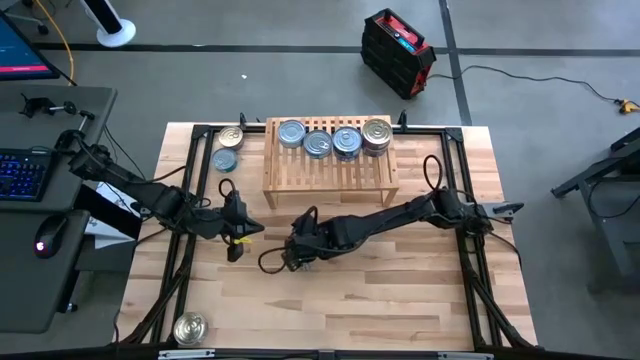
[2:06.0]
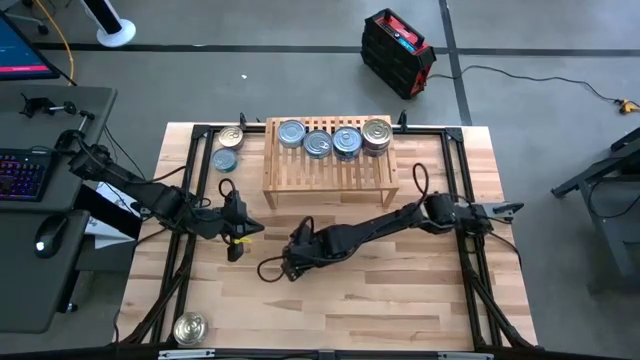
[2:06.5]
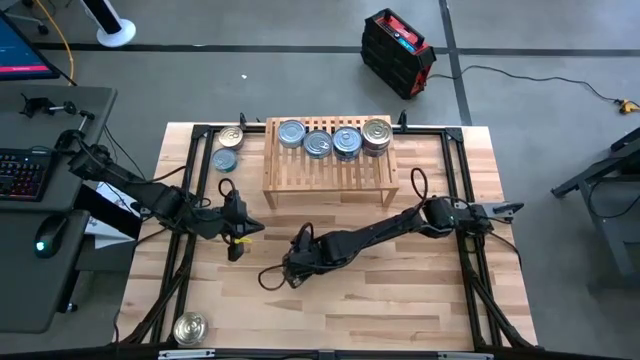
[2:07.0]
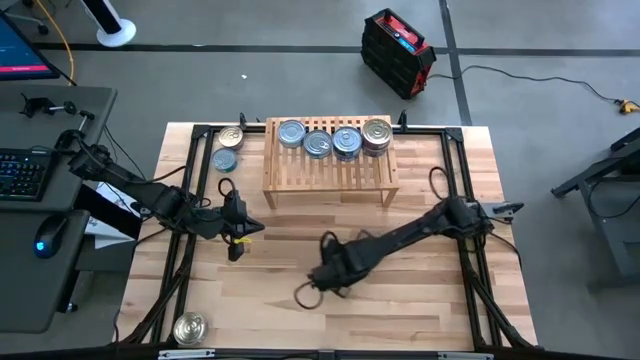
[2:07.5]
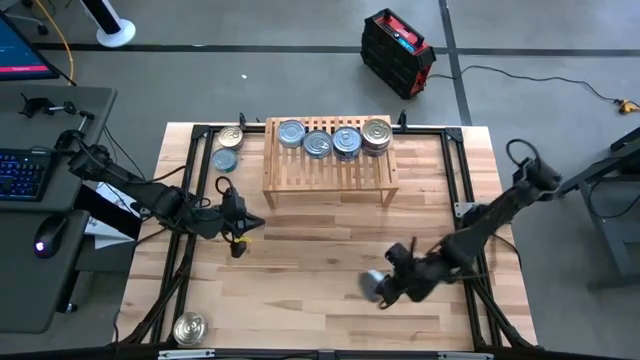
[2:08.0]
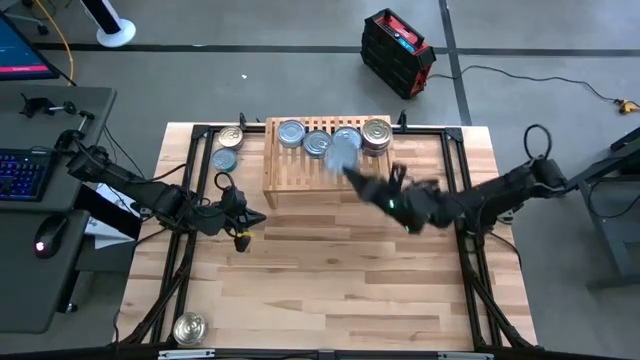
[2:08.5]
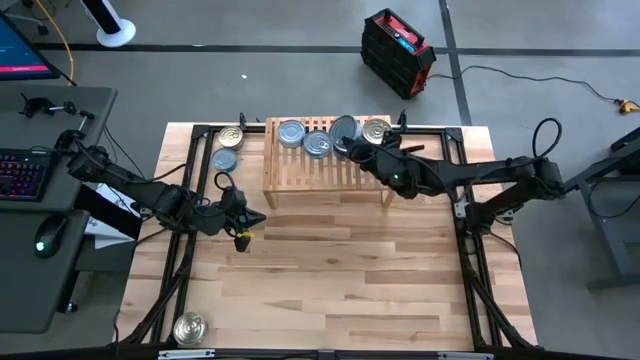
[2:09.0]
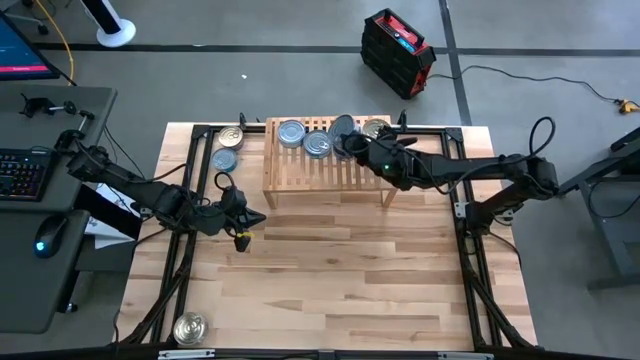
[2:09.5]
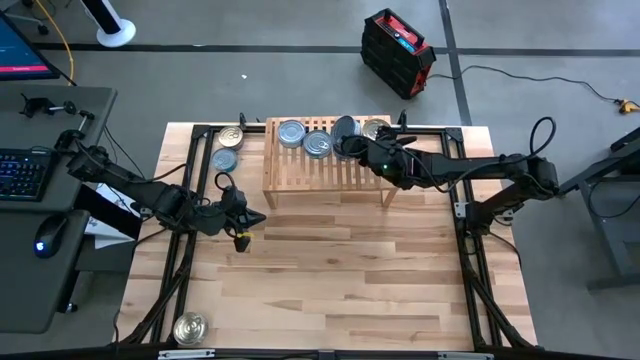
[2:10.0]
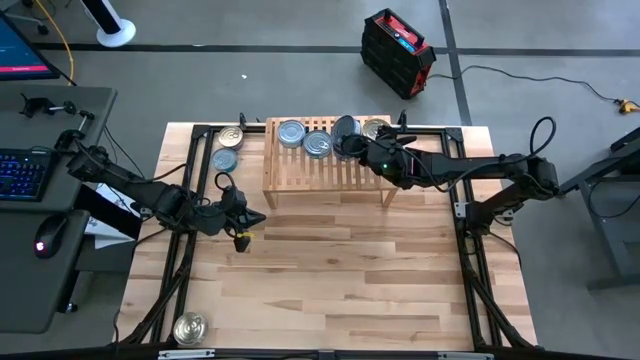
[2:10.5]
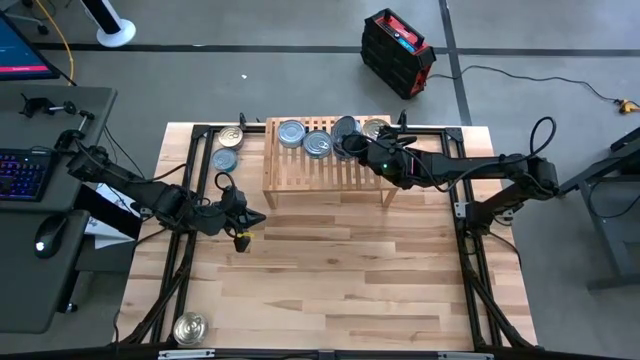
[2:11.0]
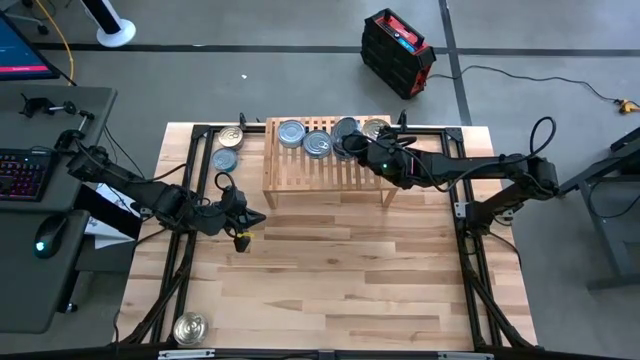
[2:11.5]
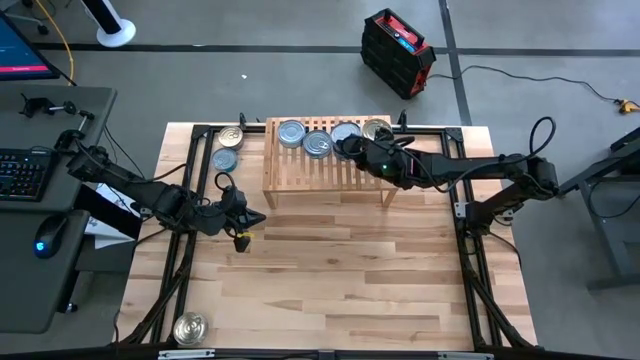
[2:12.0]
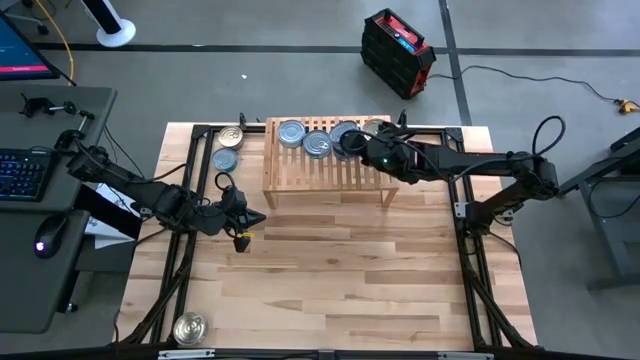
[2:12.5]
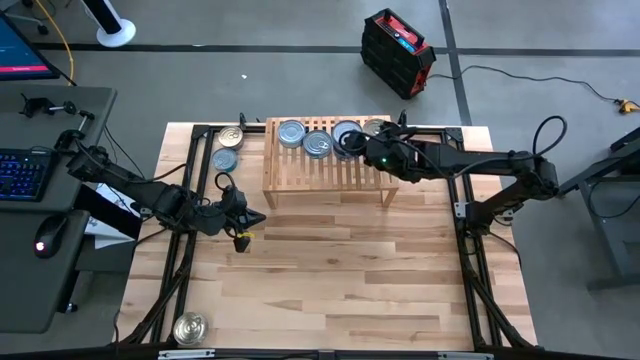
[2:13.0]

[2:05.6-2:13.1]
Task: Stack canned seafood by type on shelf
Stack the blue tuna can on the stacked blue tuna cans on the shelf

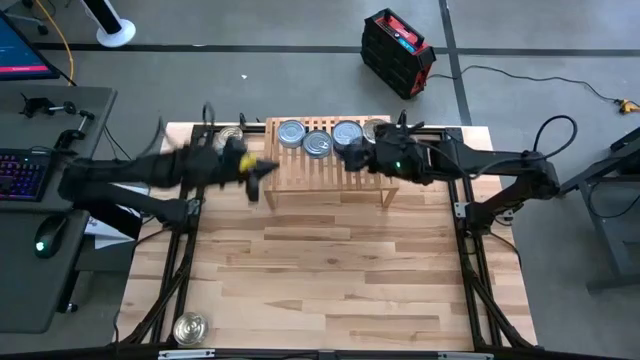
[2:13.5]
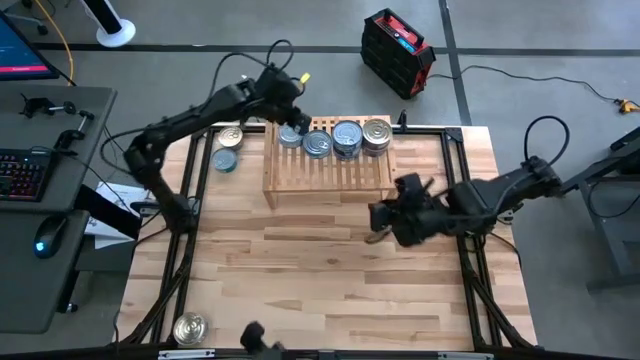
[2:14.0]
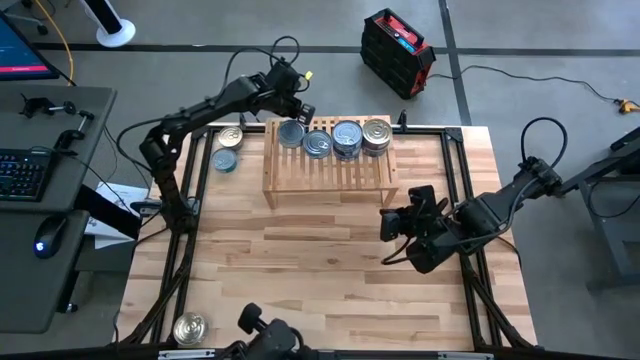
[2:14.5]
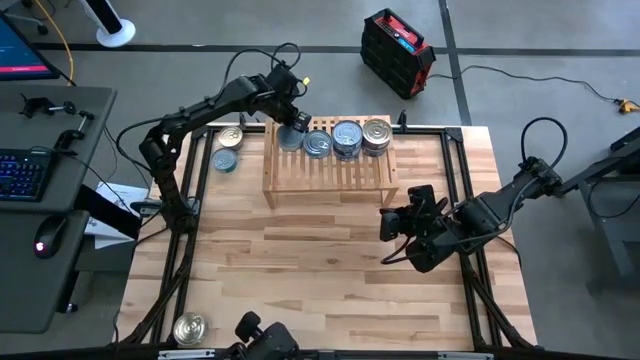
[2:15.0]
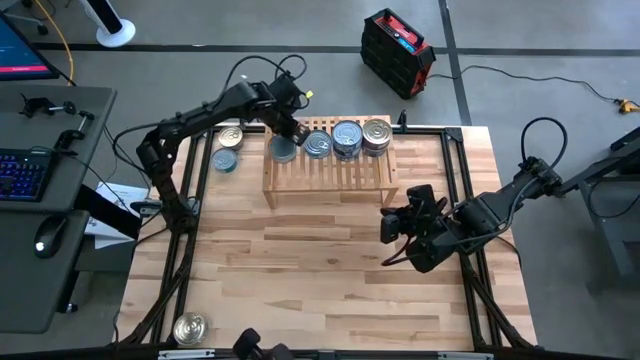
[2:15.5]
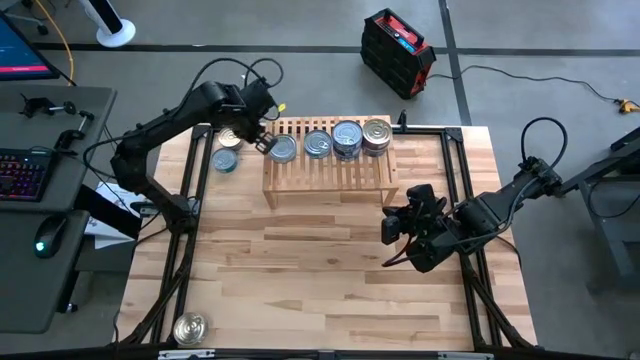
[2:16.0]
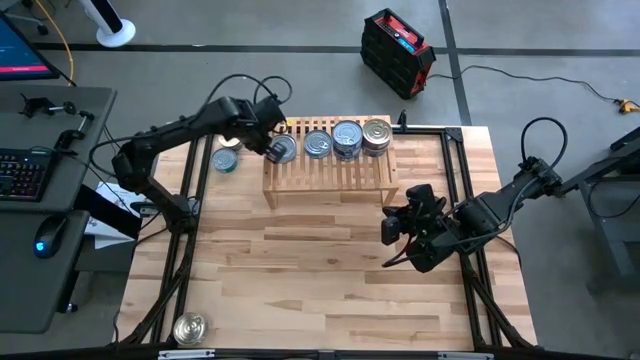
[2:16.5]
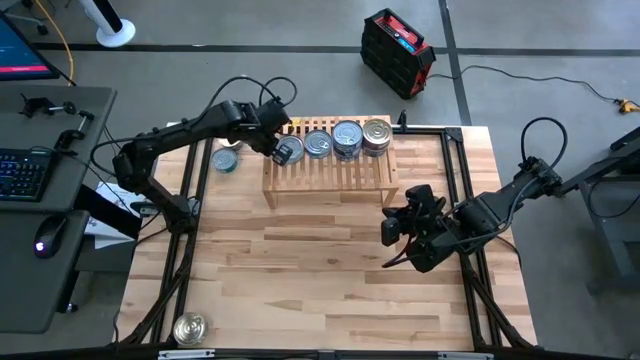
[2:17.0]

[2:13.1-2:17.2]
Adjust the green tuna can on the shelf

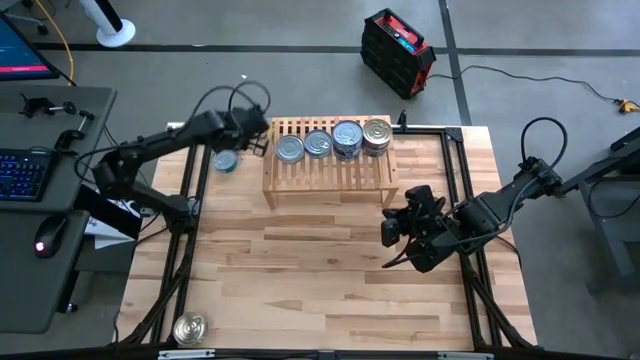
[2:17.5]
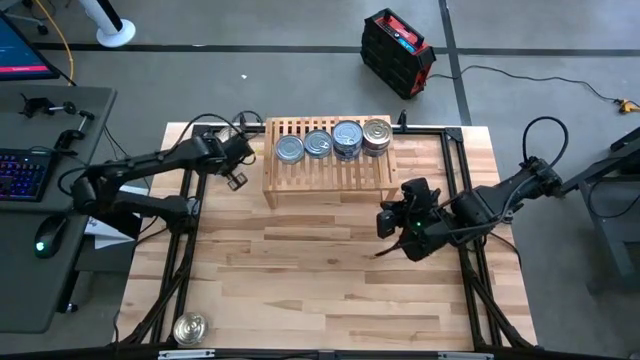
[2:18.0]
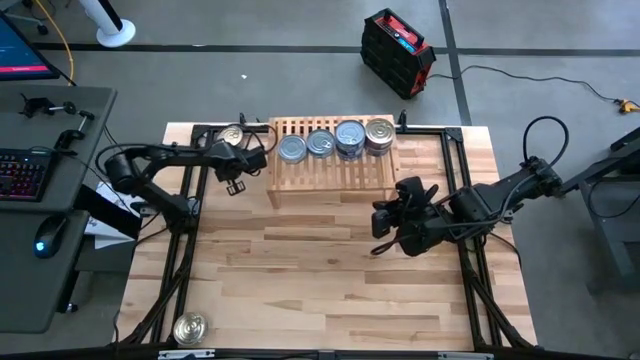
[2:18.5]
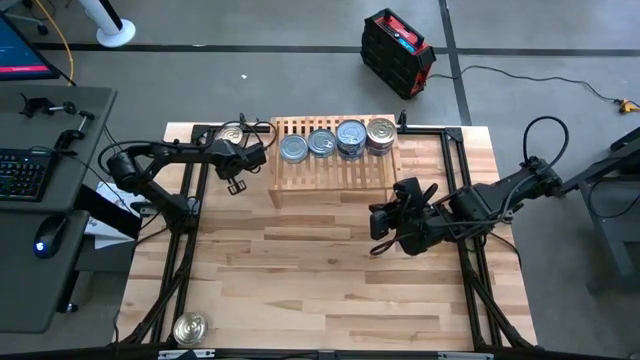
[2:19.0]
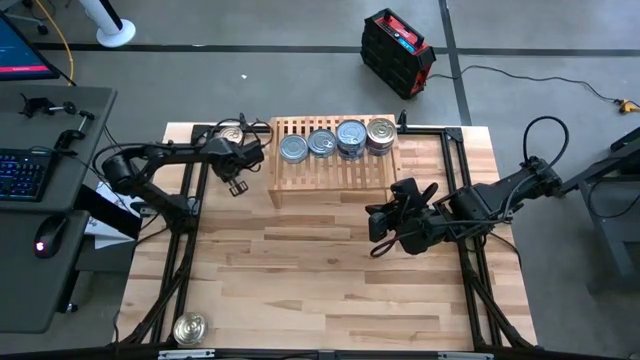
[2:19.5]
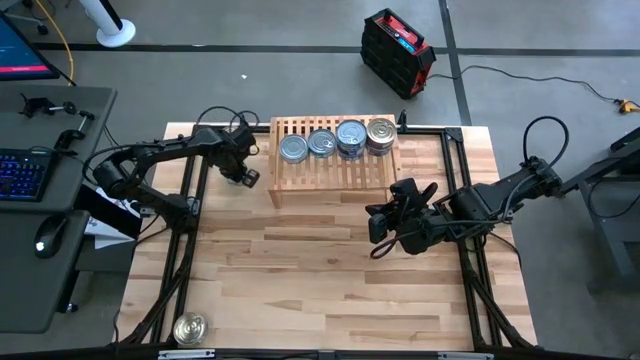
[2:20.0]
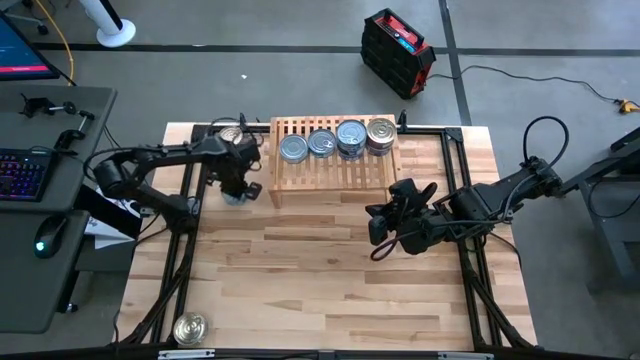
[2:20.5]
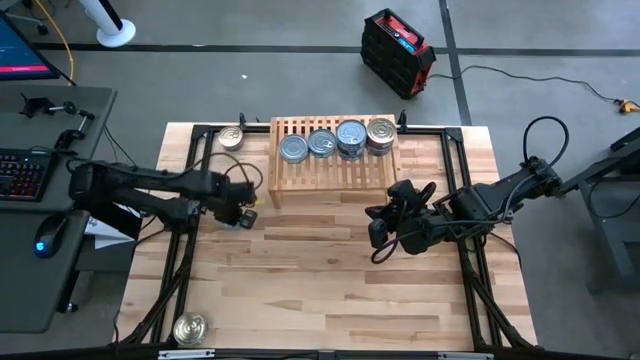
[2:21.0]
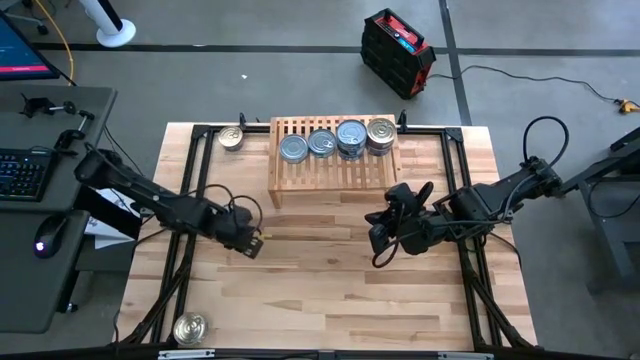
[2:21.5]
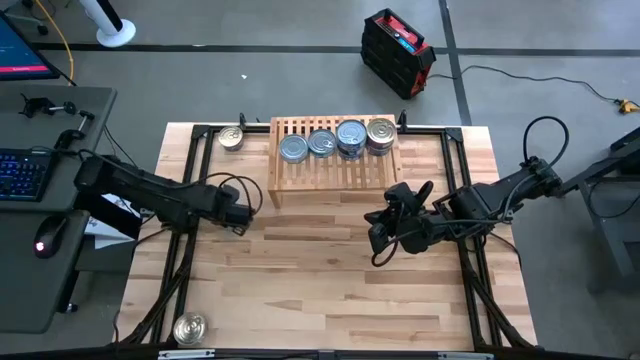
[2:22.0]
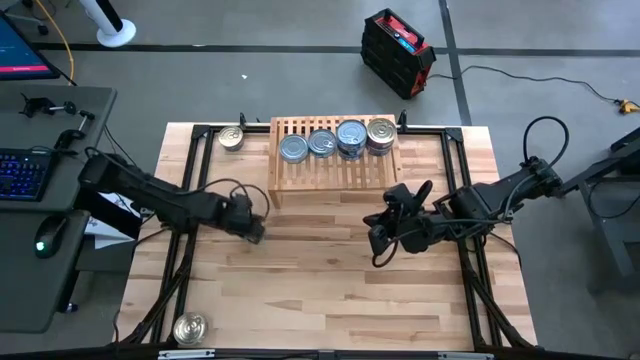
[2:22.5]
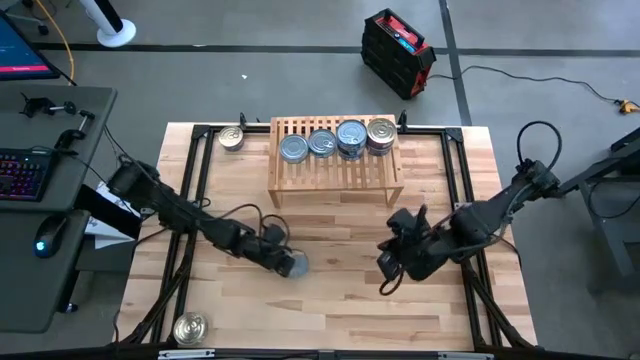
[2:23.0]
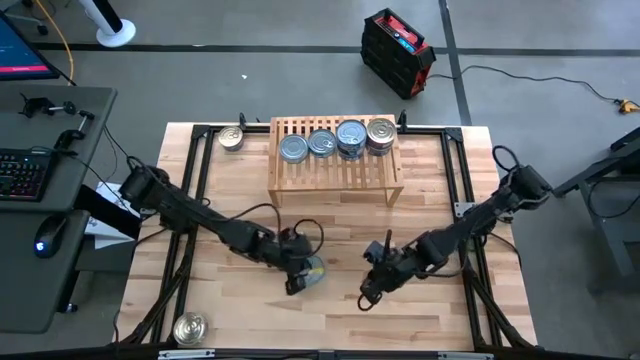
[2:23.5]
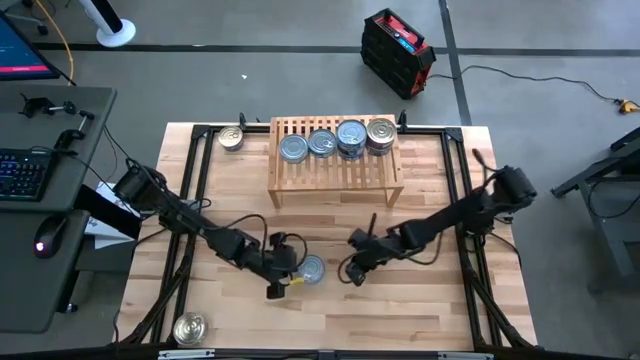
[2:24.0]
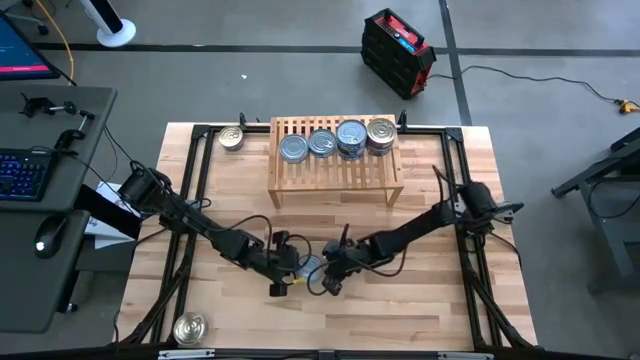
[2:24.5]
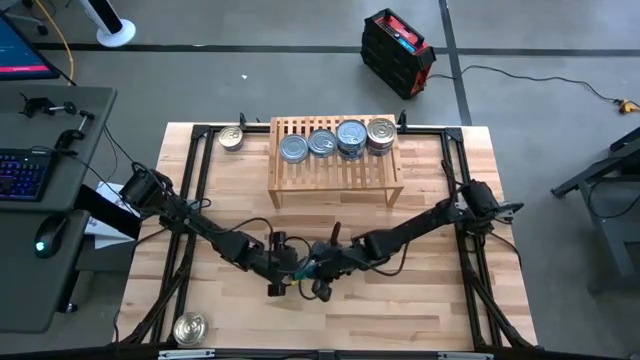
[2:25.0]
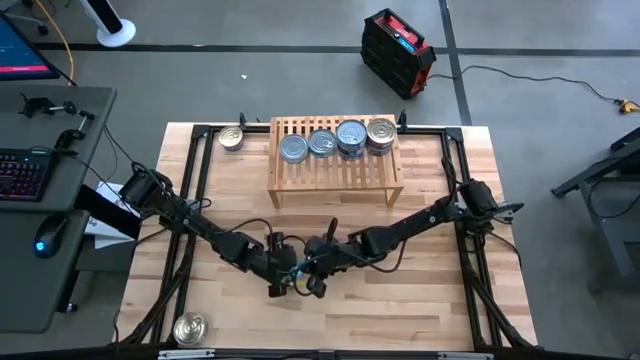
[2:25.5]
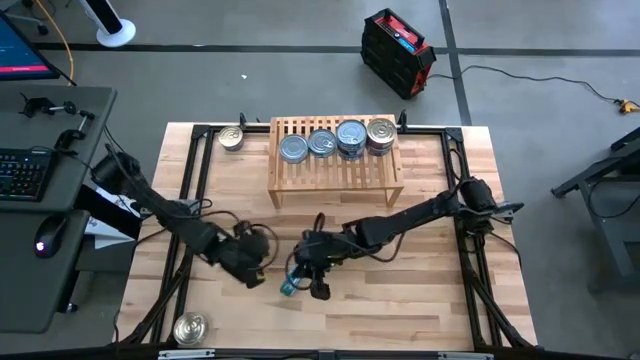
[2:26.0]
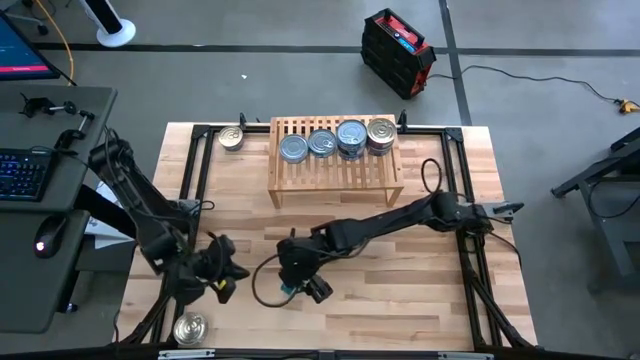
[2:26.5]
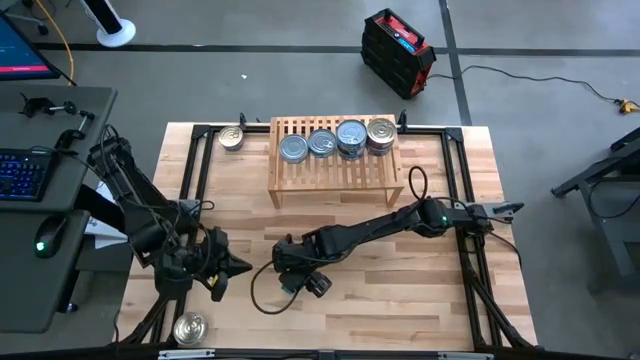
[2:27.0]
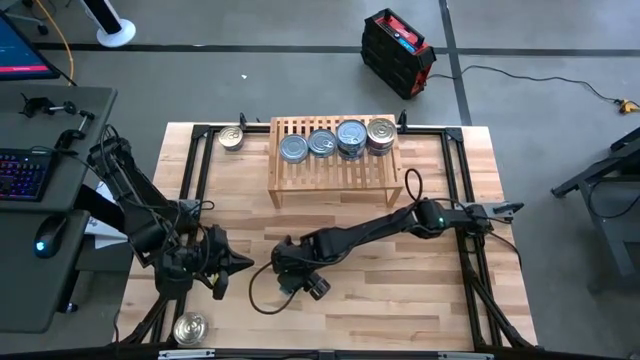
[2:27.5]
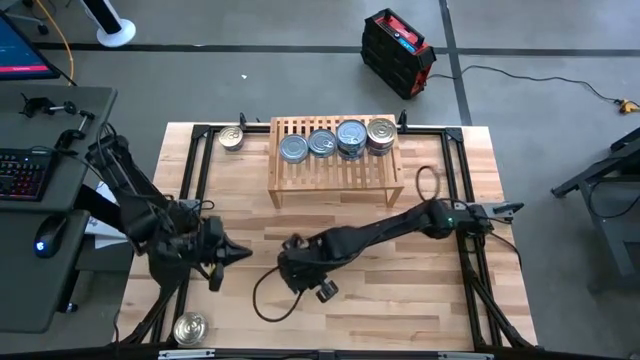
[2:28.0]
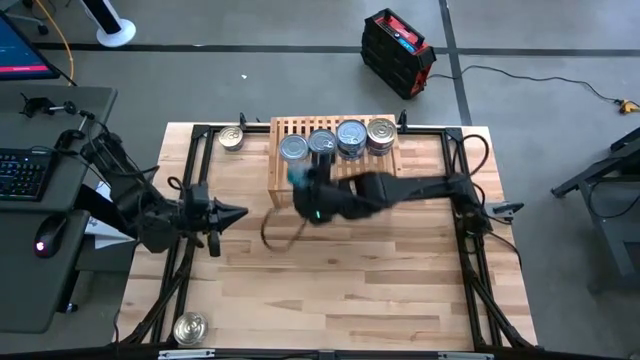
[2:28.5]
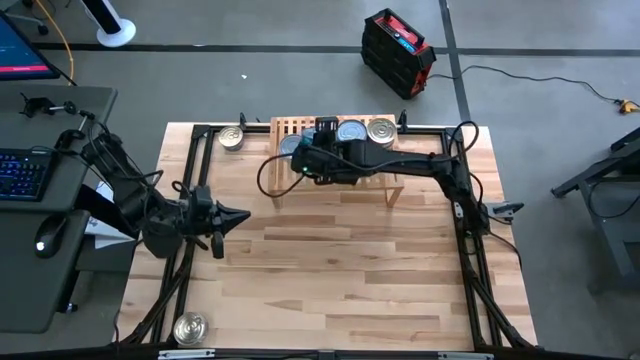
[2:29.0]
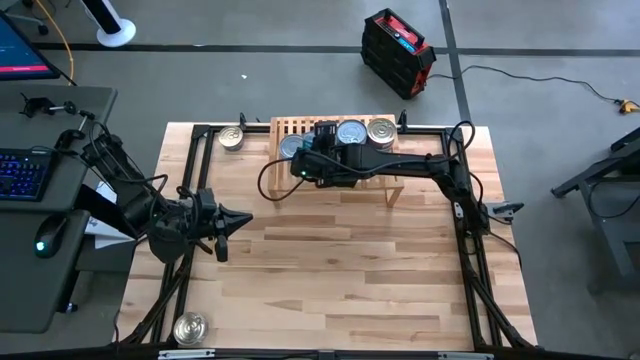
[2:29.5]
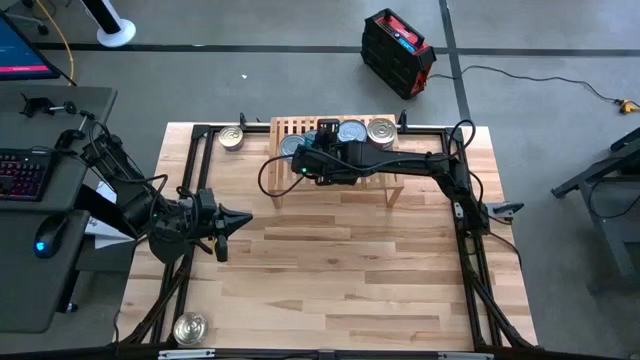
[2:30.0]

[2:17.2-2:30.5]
Stack the green tuna can on the green tuna on the shelf
